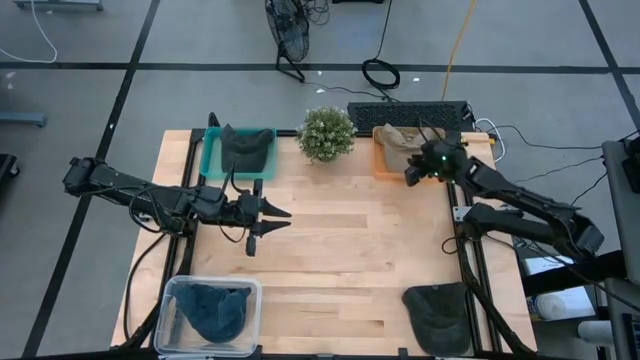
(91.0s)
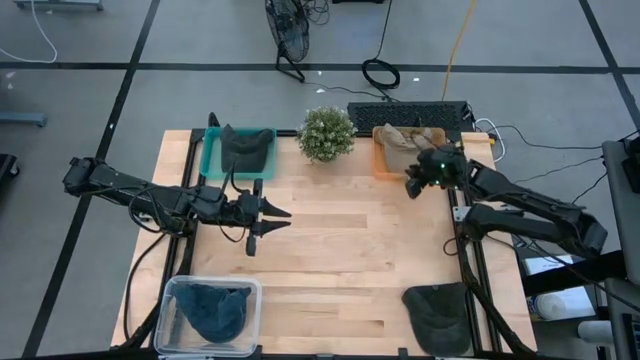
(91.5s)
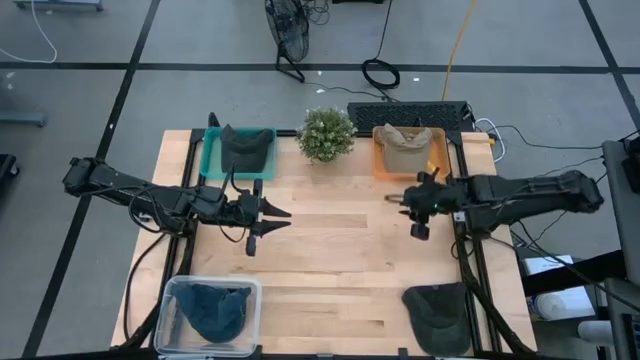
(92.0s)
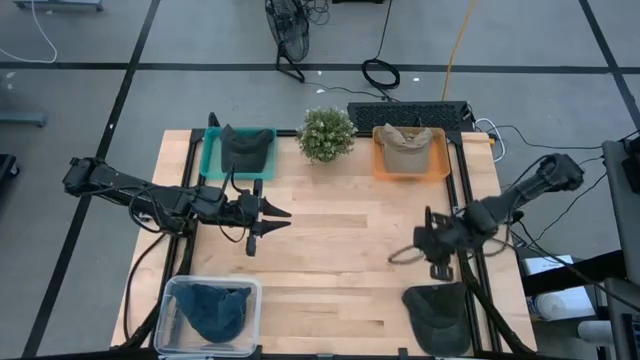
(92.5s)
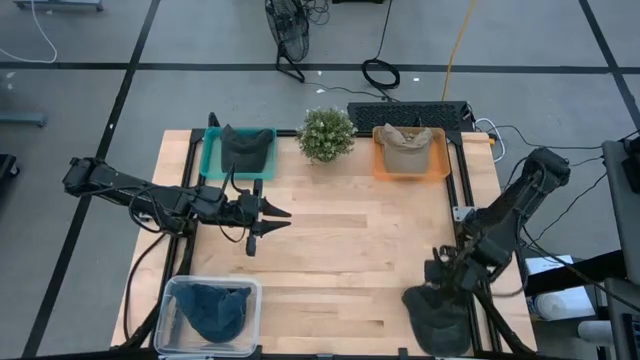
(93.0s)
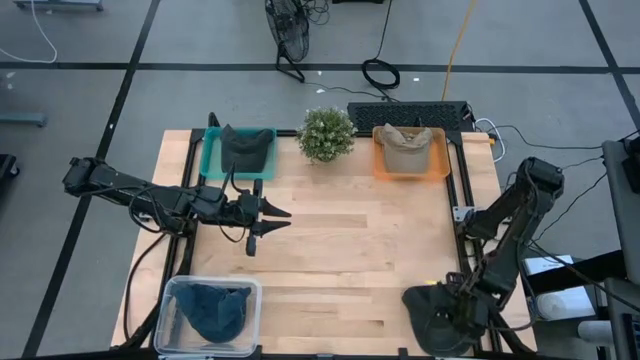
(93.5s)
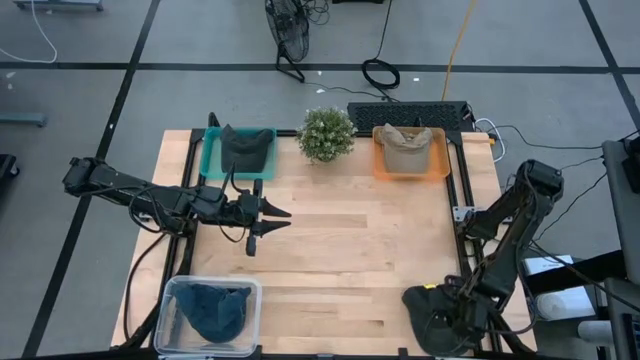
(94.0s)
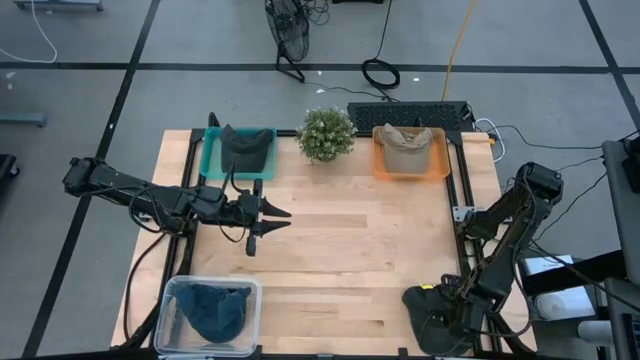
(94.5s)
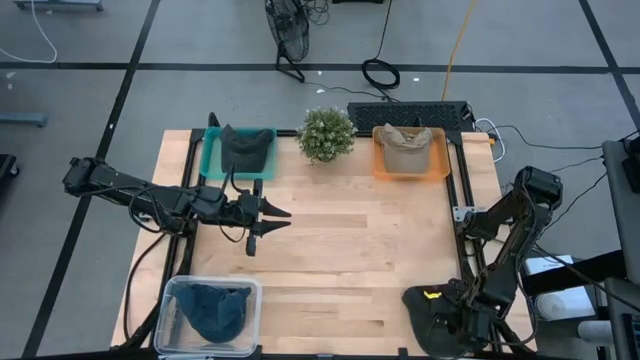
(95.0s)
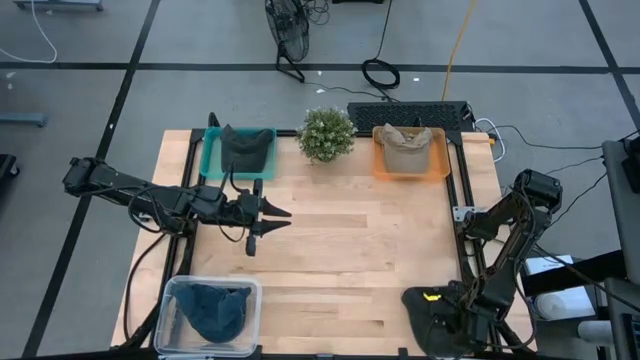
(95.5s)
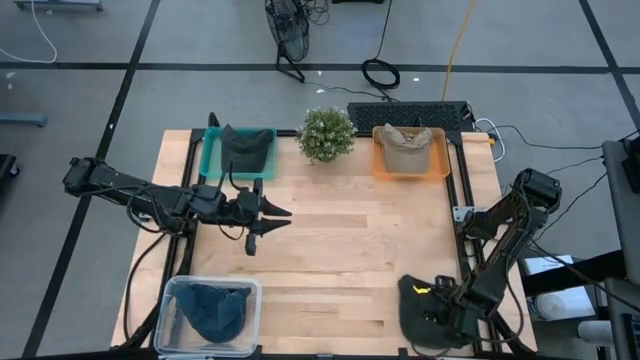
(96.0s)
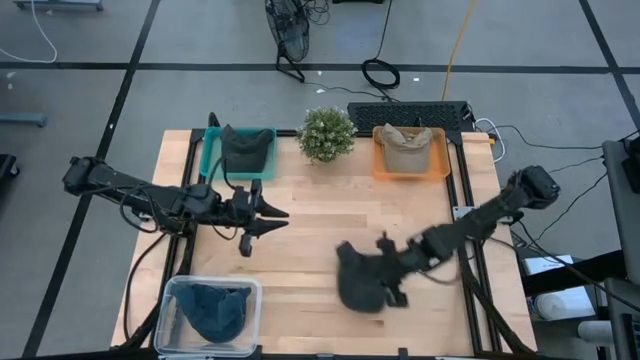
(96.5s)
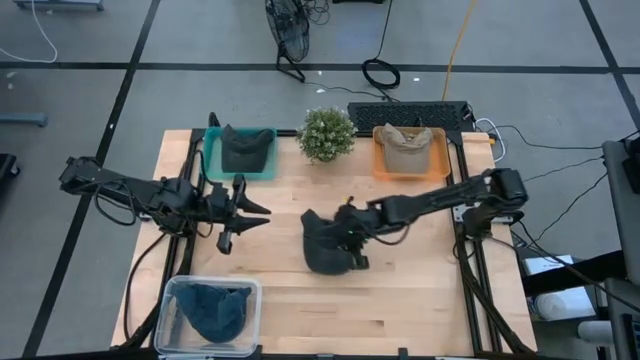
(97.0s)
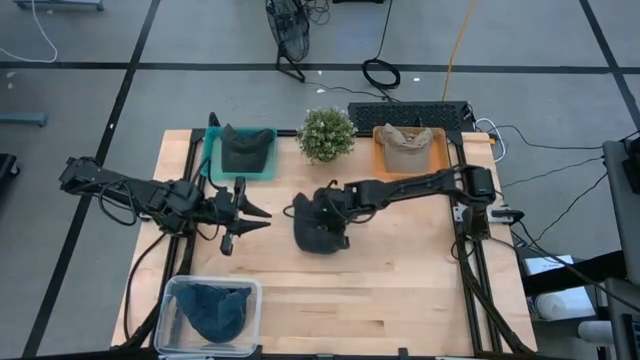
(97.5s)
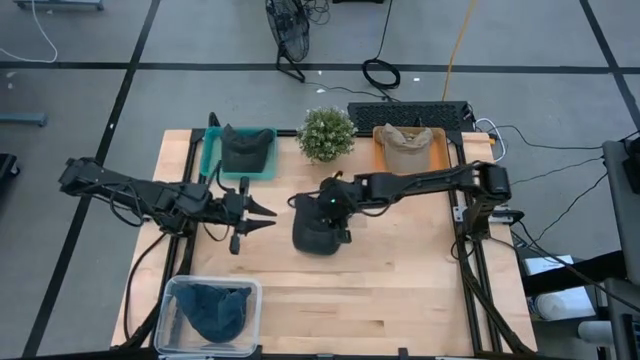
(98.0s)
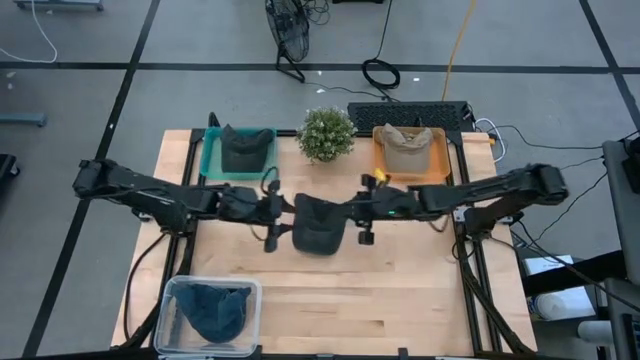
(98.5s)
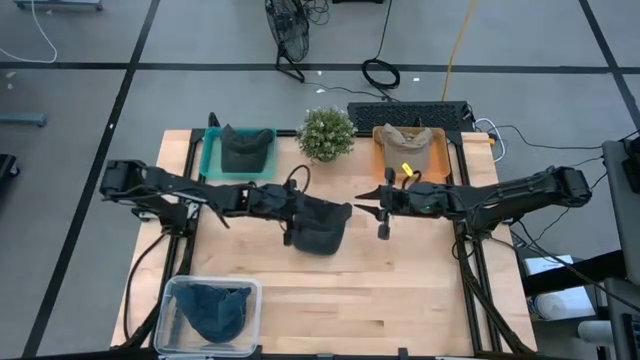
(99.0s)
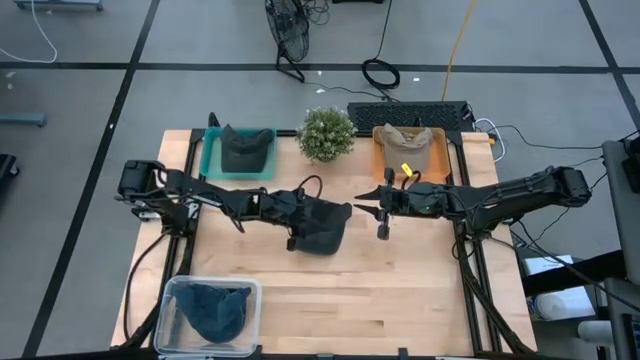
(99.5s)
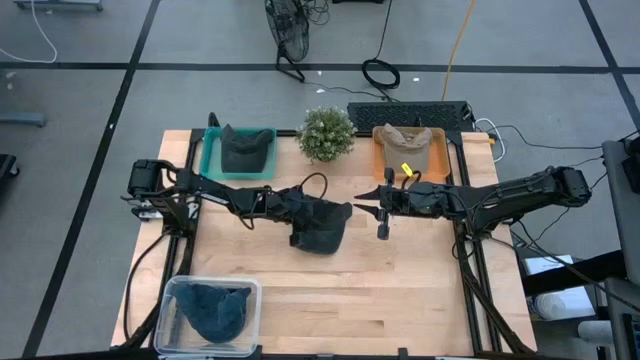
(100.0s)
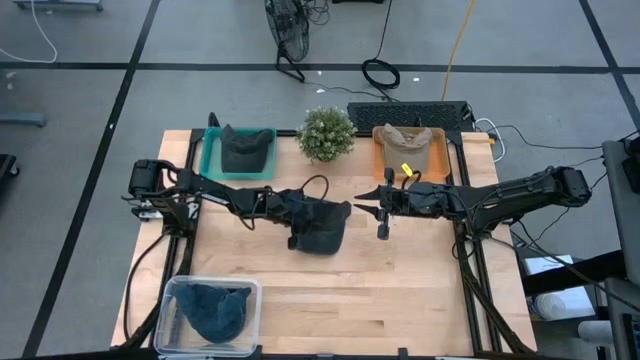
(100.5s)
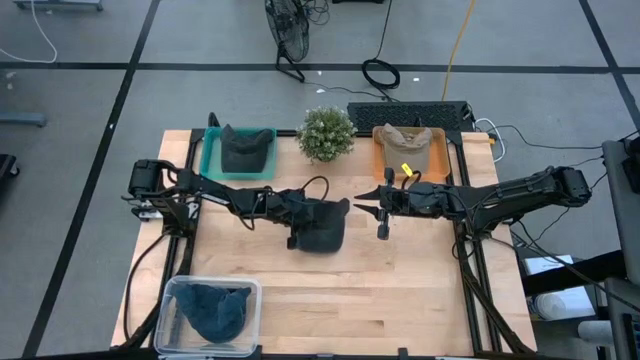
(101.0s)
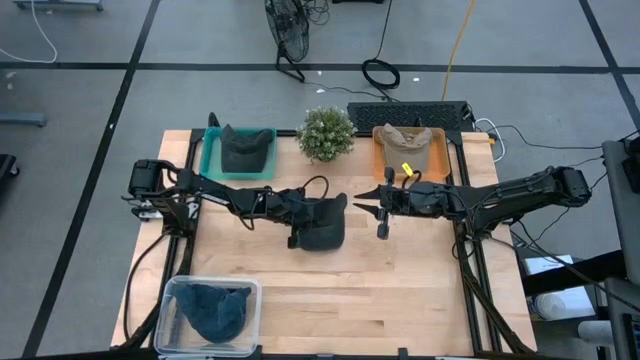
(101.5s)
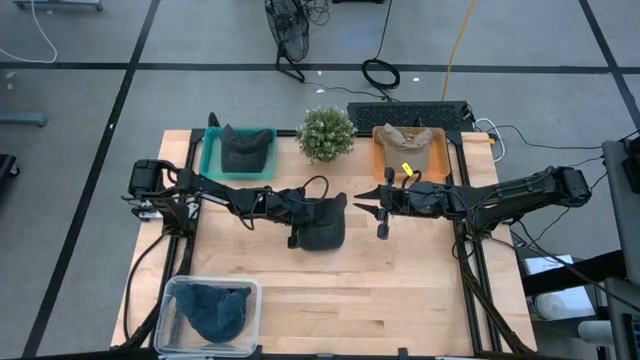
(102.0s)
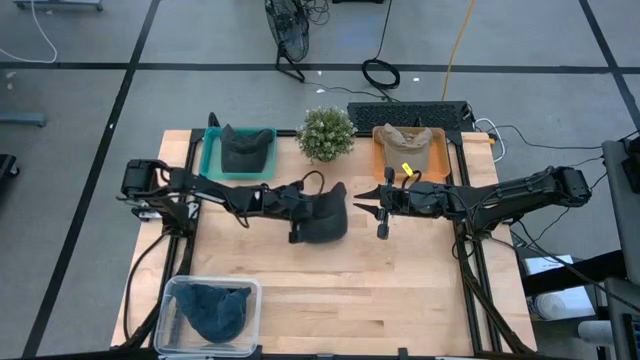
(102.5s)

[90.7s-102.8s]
Task: Pick & Place hat
Put the black cap into the green bin

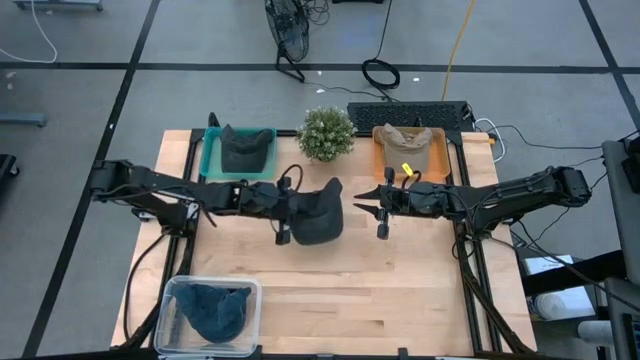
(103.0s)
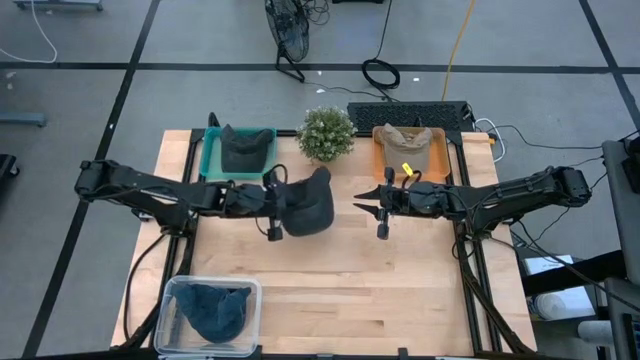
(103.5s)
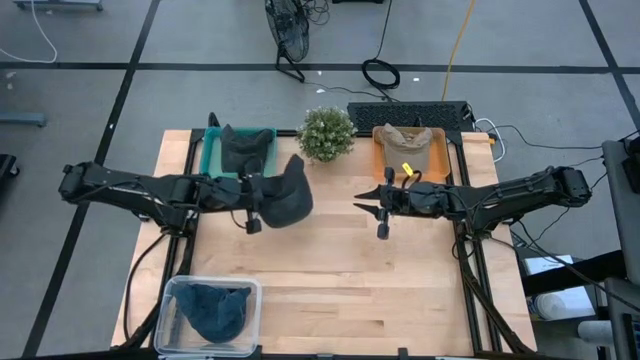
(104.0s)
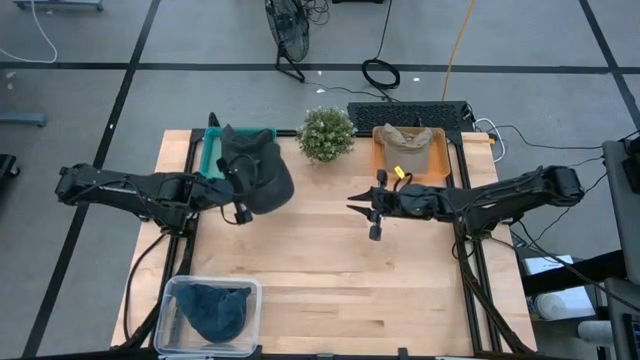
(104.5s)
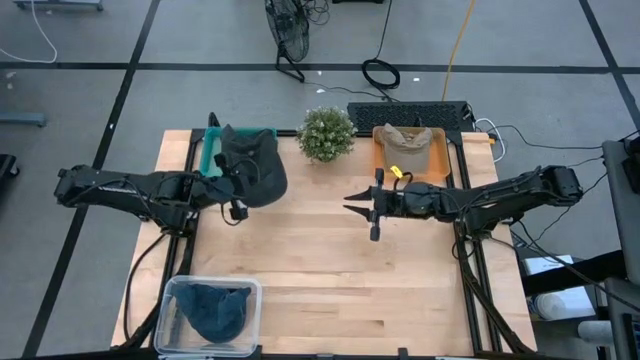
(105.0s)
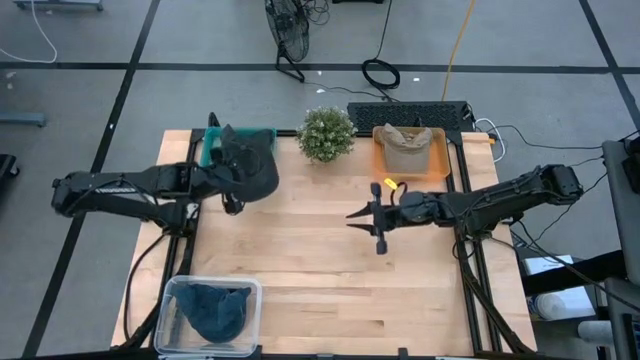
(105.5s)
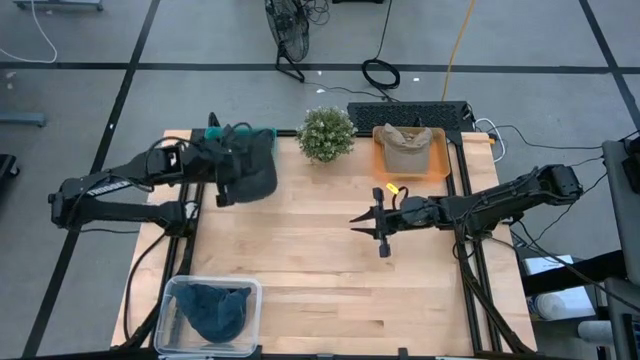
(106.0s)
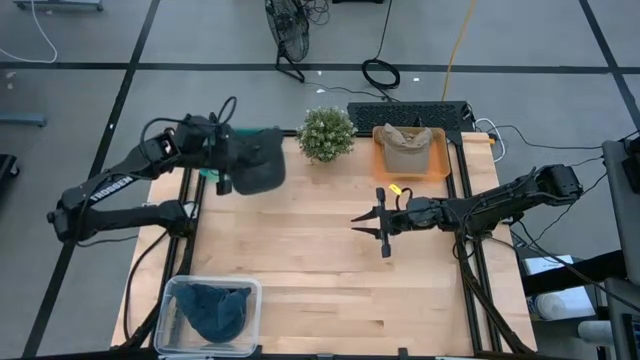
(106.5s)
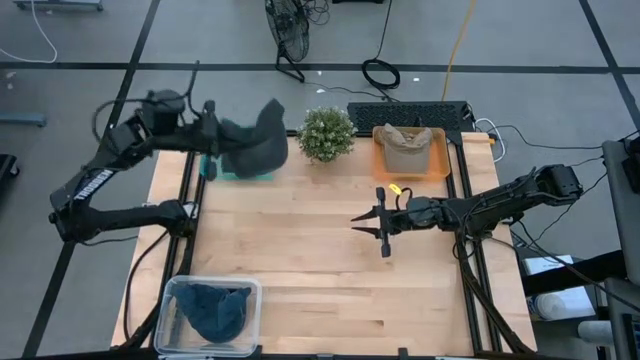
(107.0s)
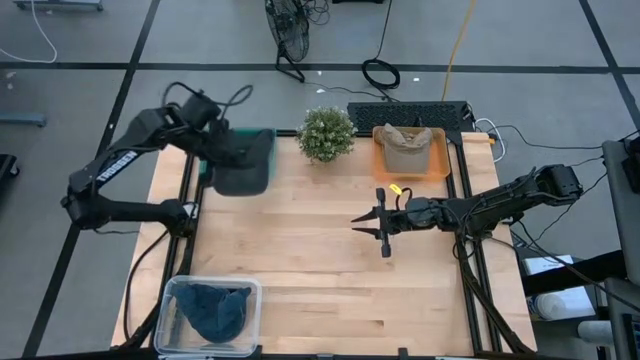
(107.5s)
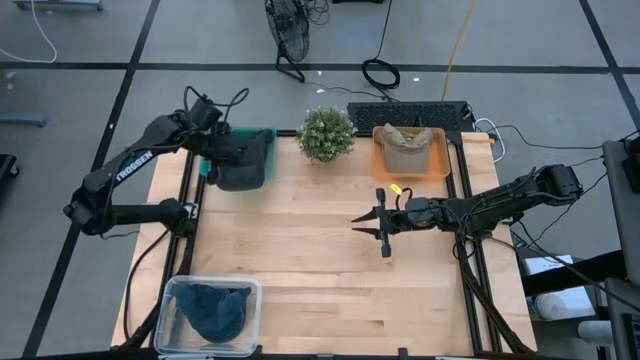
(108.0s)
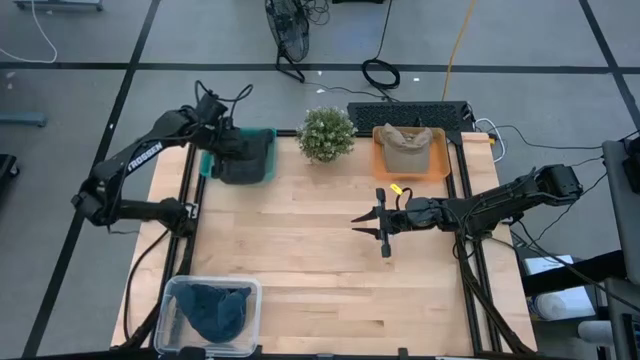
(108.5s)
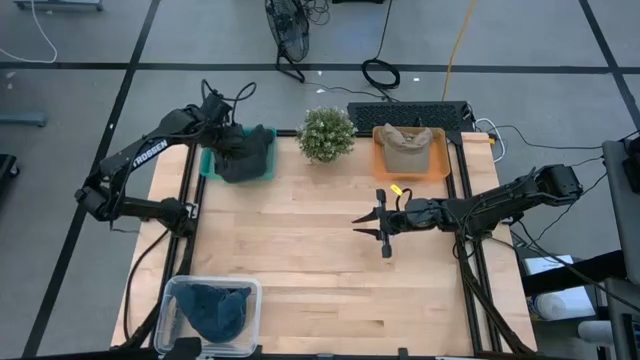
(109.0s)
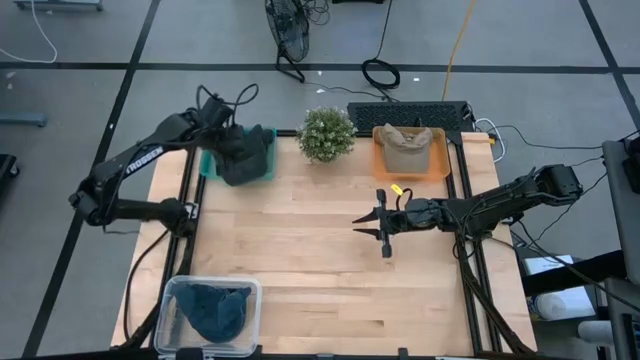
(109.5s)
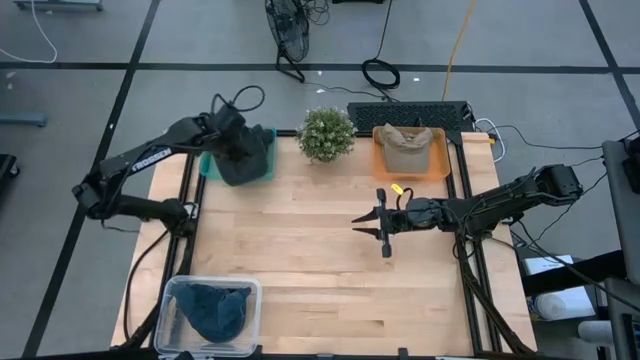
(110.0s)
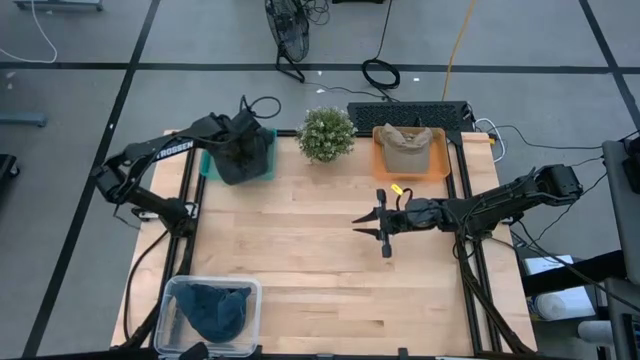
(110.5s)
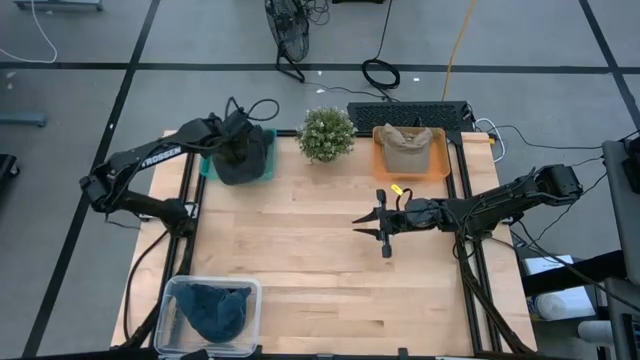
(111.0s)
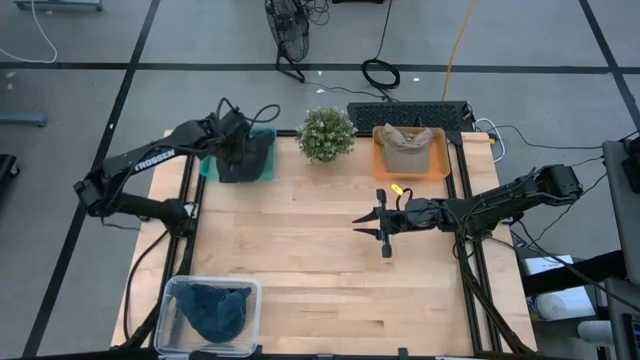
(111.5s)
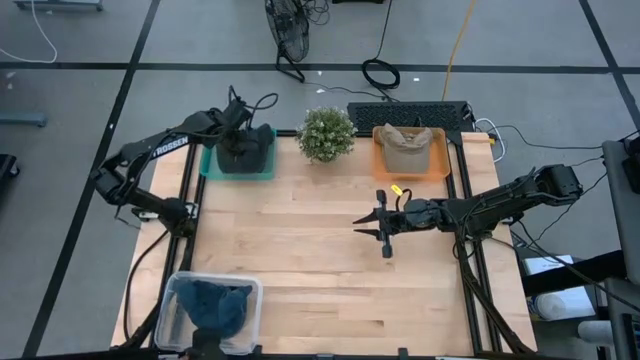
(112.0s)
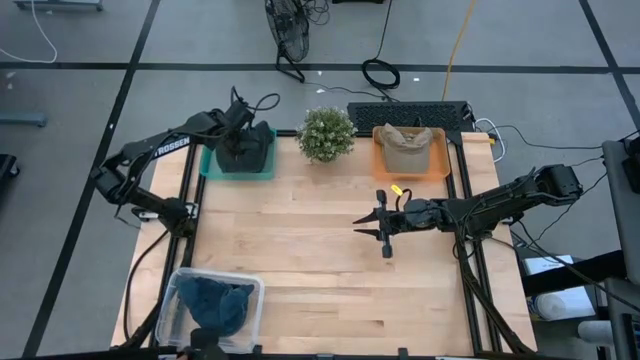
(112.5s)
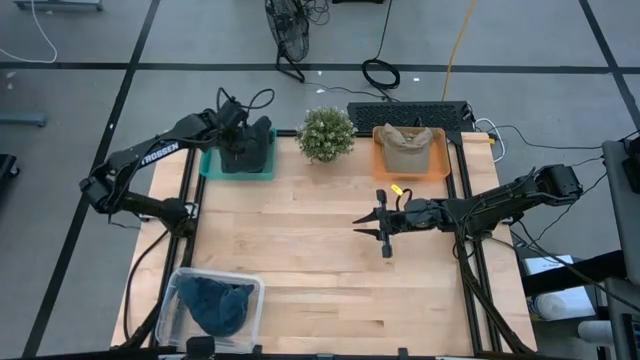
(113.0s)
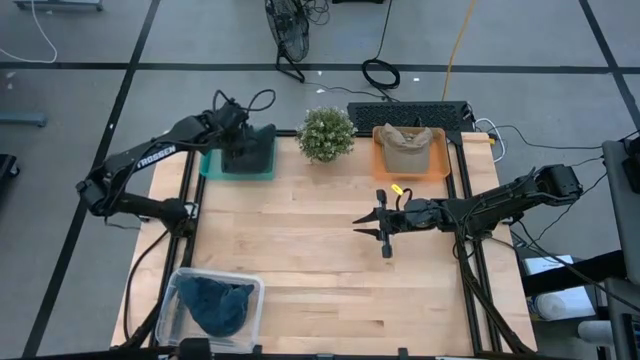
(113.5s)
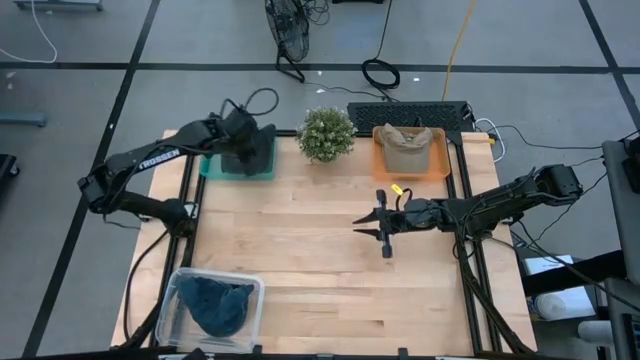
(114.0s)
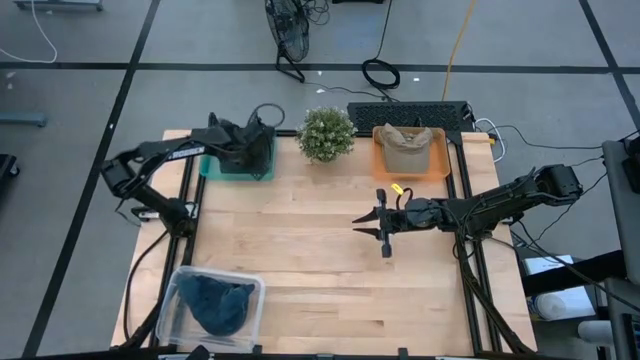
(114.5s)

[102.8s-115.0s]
Put the black cap into the green bin
